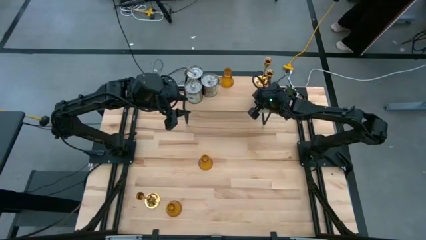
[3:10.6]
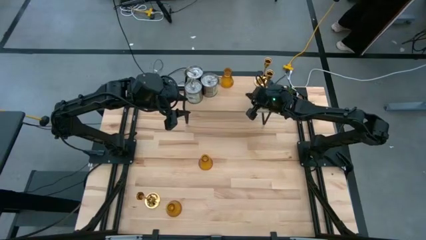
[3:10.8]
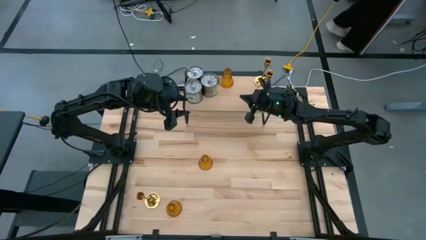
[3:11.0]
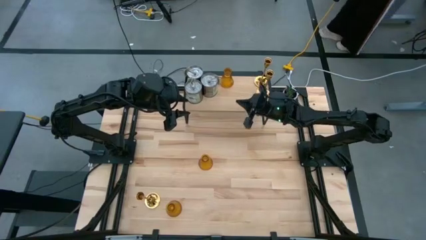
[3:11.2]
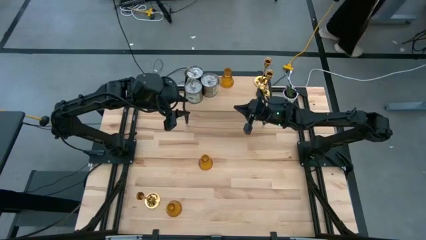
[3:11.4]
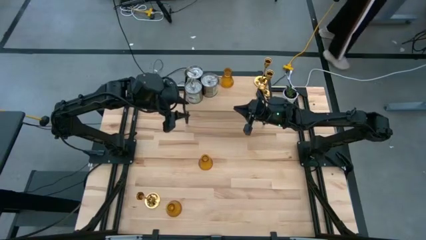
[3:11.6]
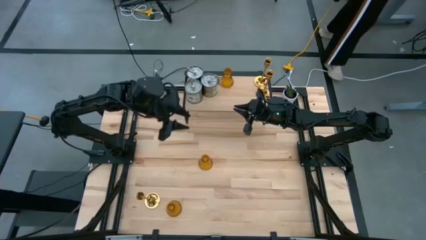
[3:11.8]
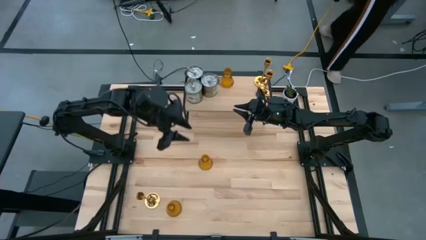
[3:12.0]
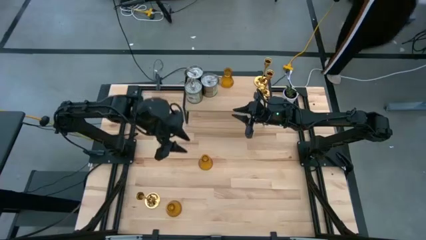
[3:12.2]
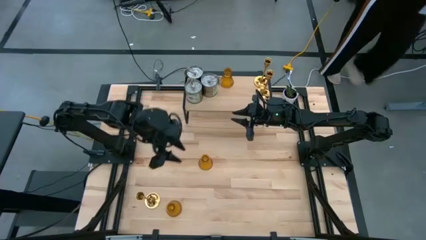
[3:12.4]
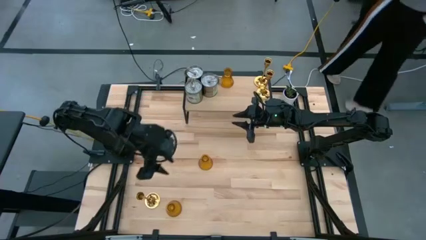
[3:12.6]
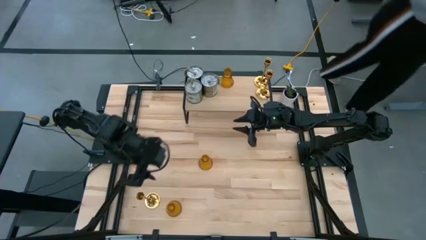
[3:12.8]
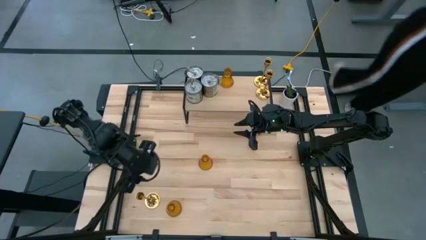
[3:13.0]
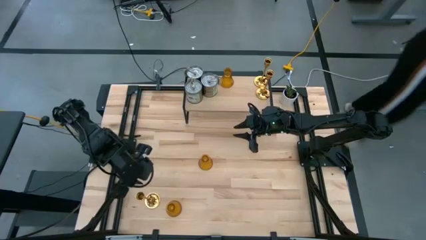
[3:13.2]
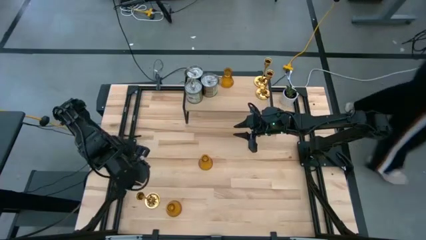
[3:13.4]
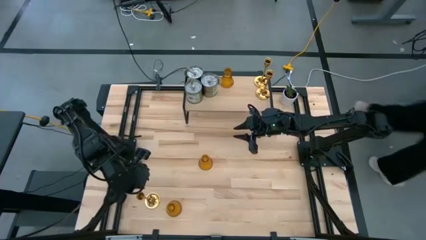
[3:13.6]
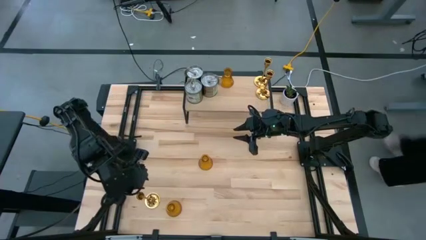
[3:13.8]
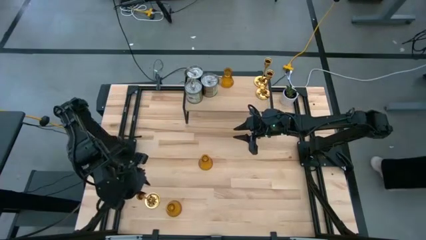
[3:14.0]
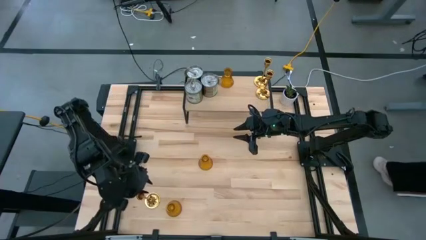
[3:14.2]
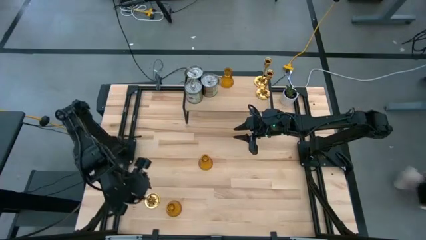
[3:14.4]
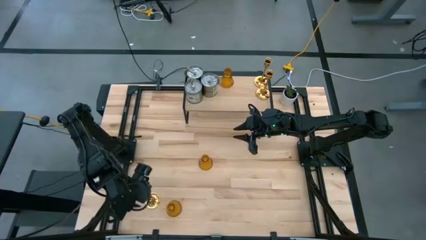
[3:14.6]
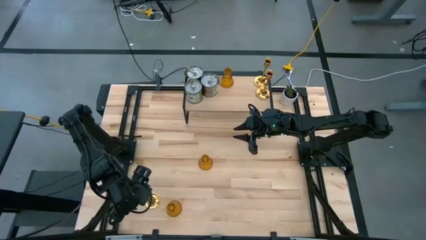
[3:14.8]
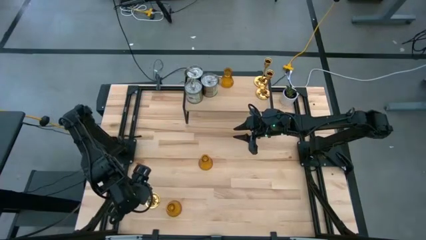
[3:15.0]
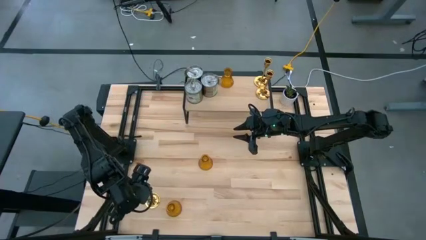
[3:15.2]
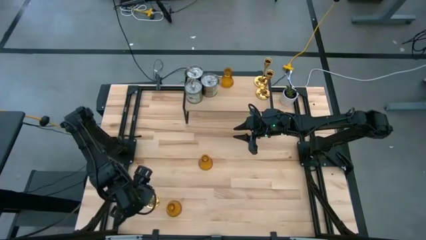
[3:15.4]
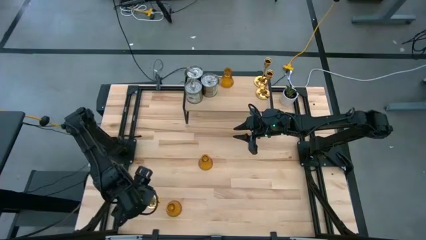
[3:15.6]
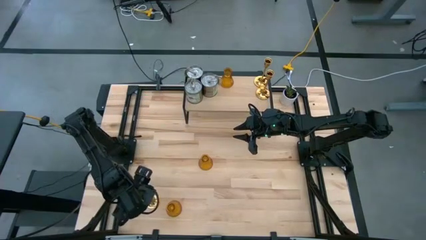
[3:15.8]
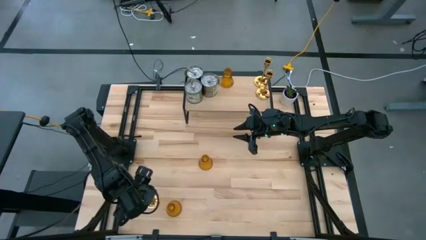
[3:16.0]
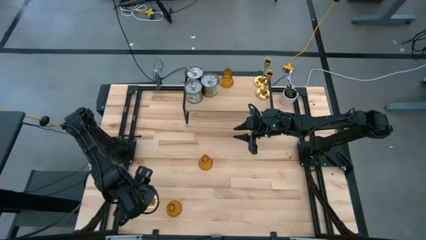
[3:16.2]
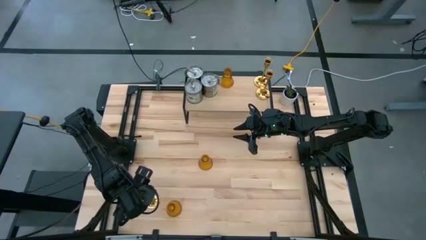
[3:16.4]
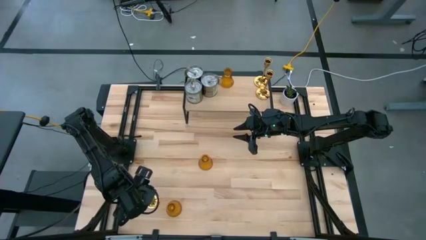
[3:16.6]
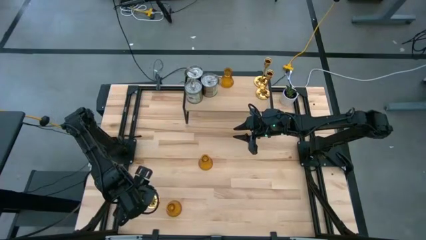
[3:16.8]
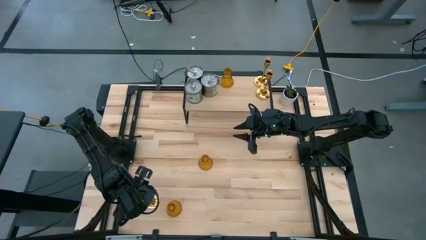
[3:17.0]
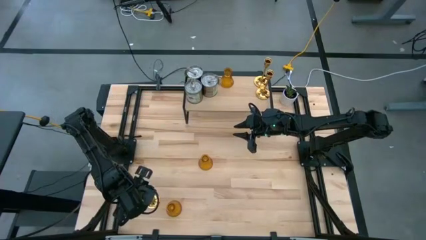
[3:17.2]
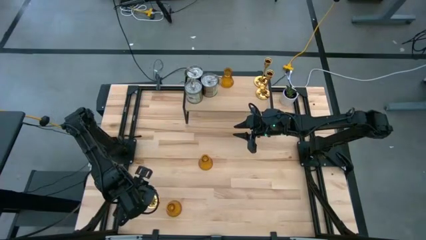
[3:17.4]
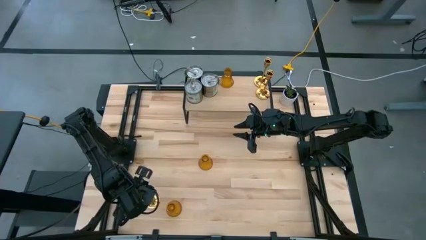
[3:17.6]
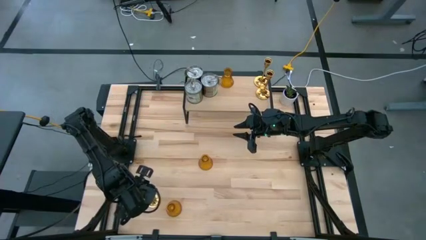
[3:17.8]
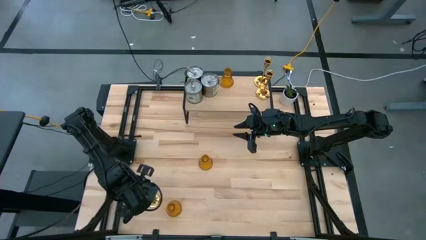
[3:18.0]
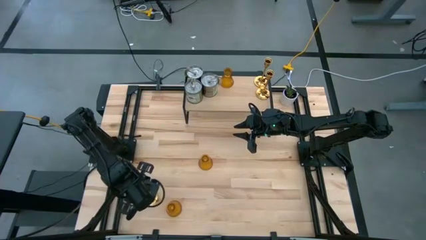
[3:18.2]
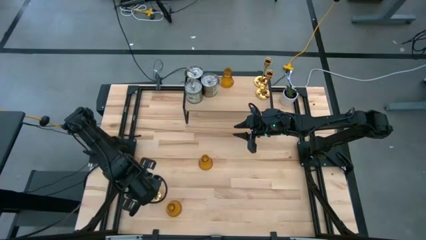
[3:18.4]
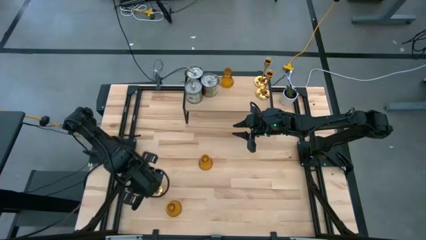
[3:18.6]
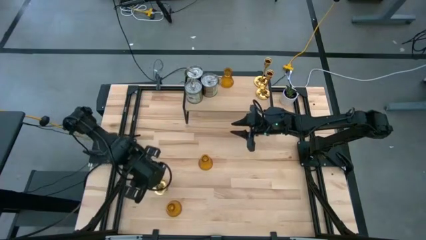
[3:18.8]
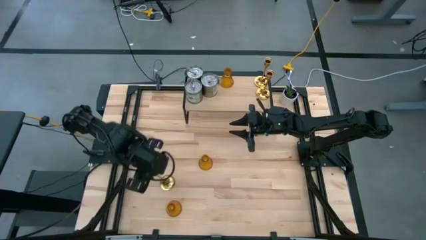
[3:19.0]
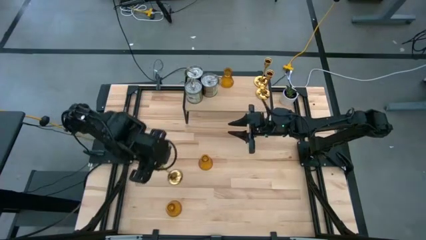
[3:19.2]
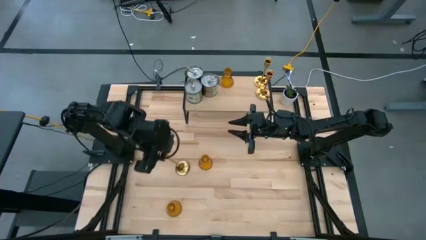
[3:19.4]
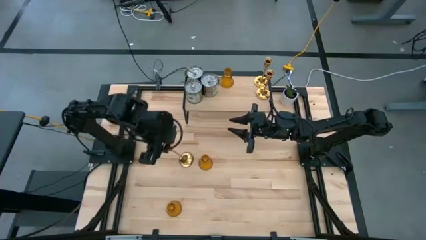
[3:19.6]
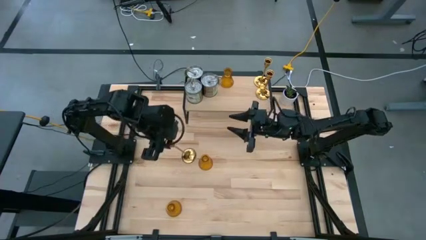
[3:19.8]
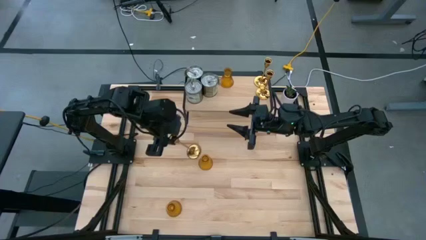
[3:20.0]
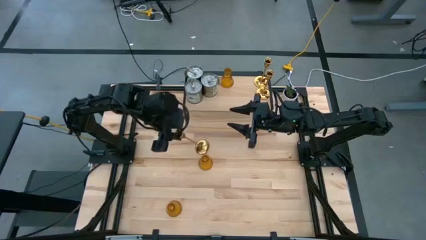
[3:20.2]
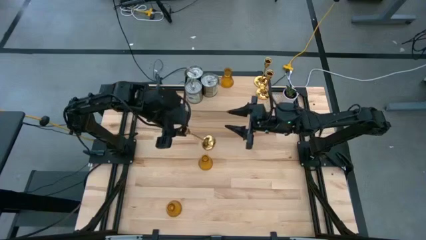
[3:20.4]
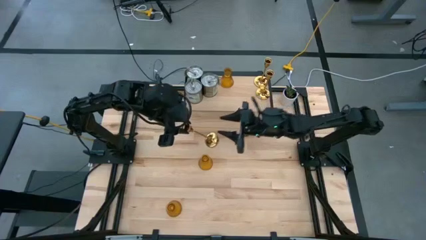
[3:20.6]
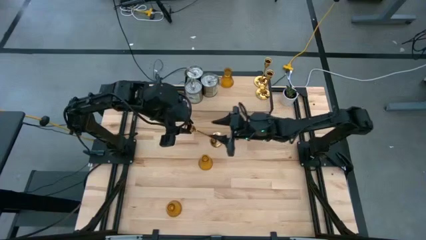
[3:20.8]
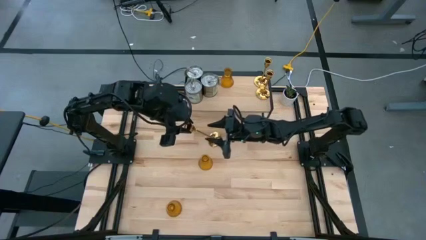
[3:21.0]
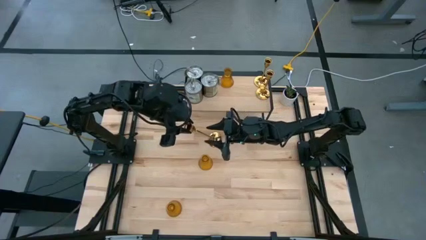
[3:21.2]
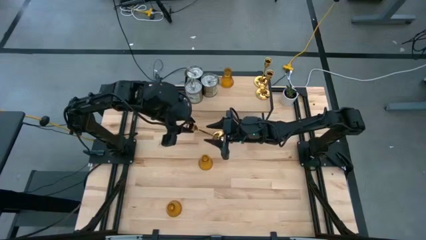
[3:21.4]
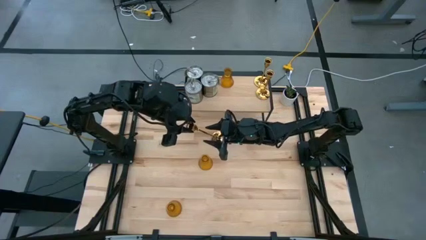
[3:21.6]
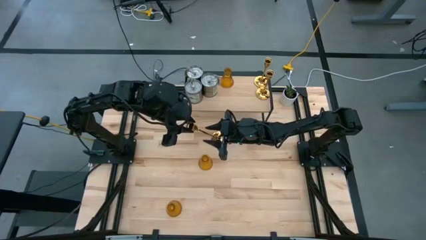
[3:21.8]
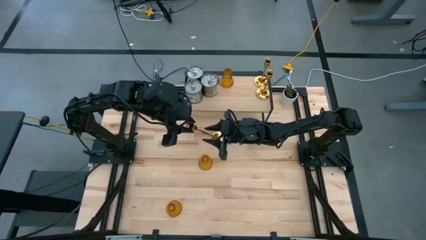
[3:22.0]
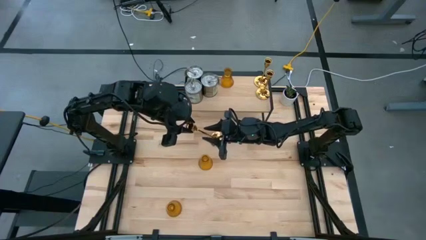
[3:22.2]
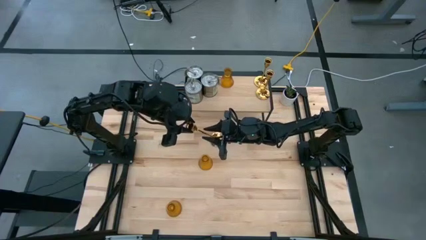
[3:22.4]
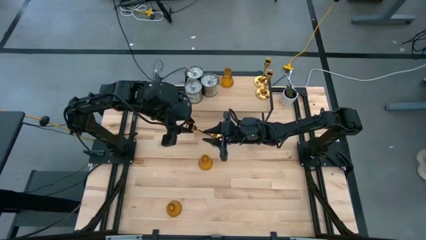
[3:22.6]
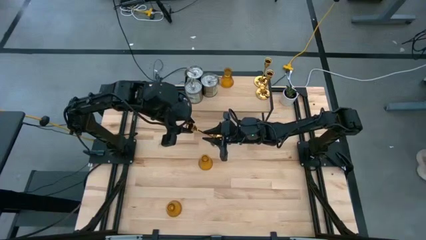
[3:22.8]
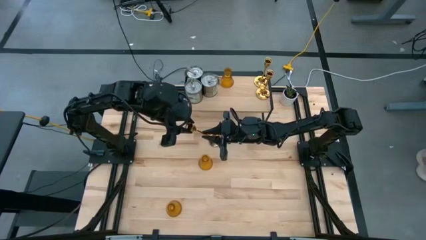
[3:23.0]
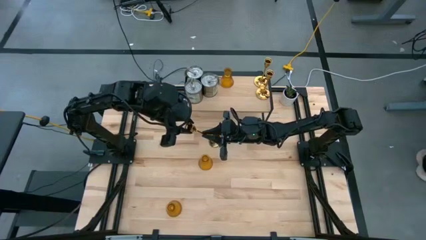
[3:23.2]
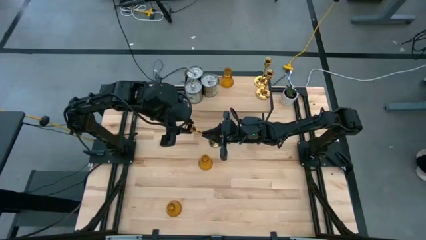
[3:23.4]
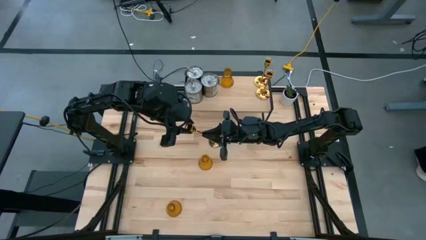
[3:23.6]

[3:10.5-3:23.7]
Task: Pick & Place candle stick holders
Put the gold candle holder on the shelf aligned with the other gold candle holders

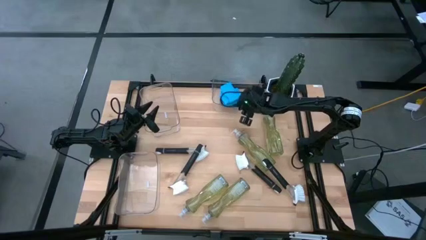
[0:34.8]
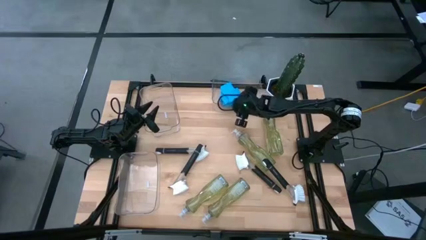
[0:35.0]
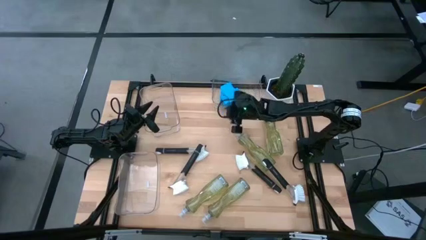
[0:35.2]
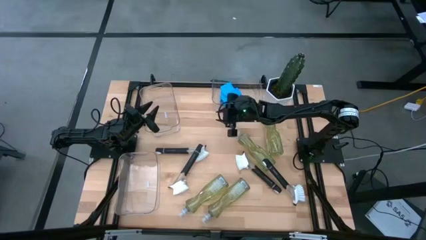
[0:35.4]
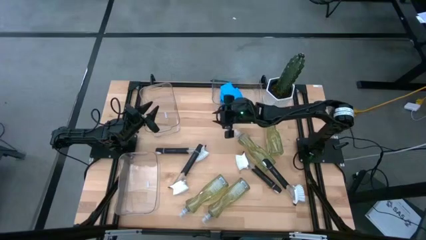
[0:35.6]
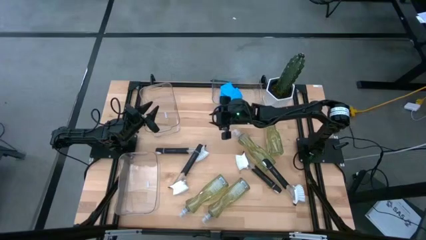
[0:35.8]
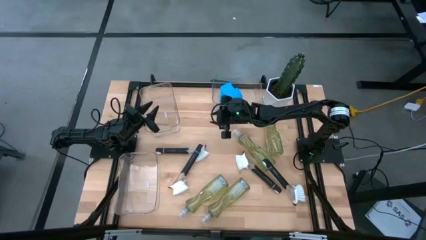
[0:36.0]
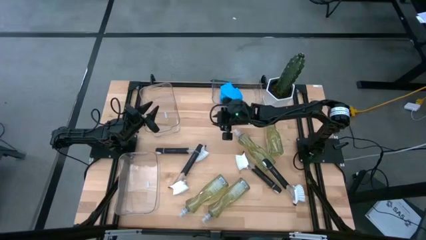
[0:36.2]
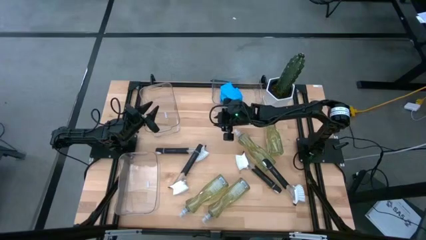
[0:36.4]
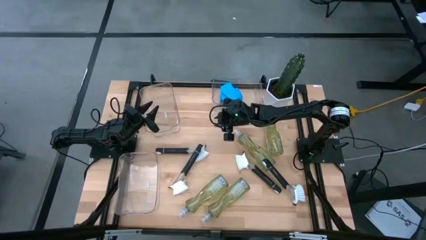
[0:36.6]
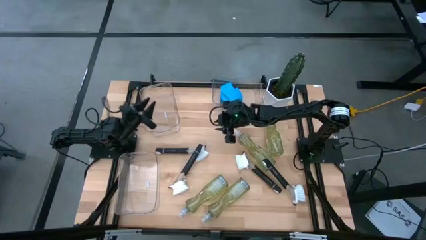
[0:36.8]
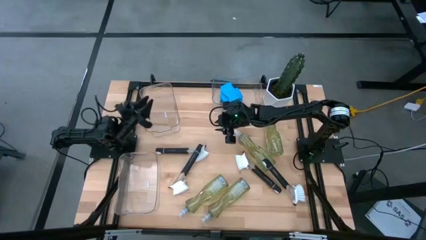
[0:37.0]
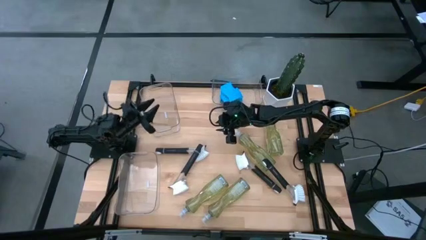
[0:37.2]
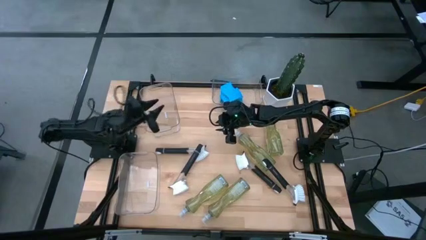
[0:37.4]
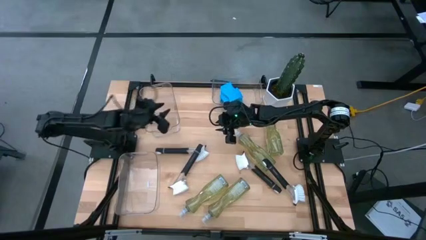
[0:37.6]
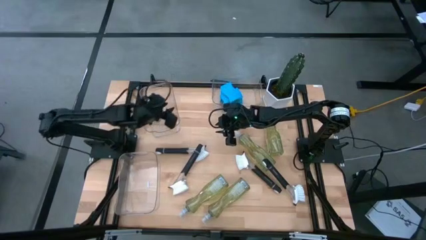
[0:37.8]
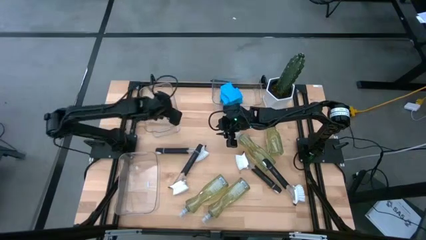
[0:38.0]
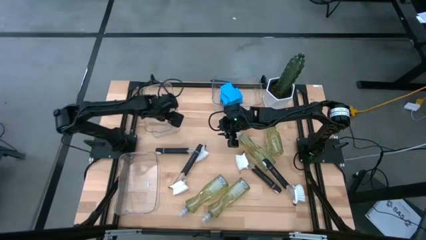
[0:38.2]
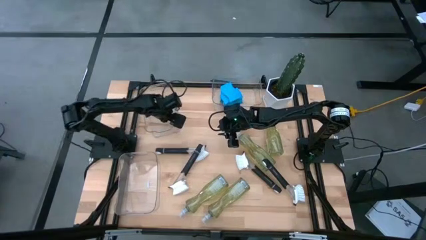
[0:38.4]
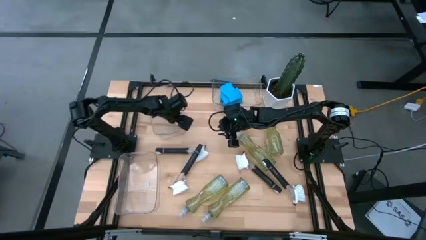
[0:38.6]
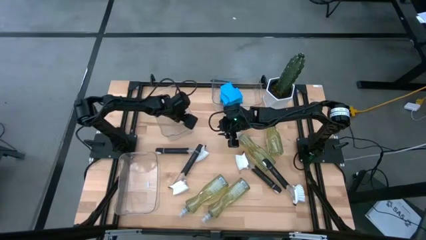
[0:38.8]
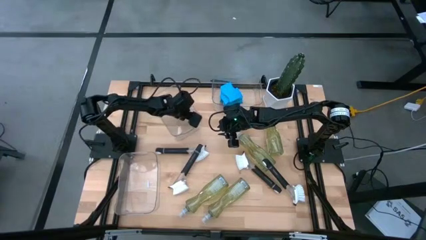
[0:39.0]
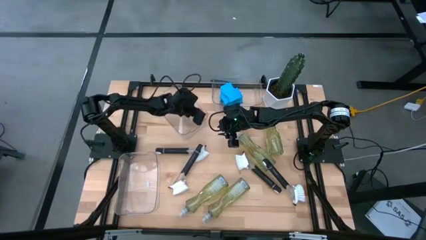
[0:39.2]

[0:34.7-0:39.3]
Task: Pick & Place Kitchen Sink Supplies
Adjust the top left transparent bin on the table
